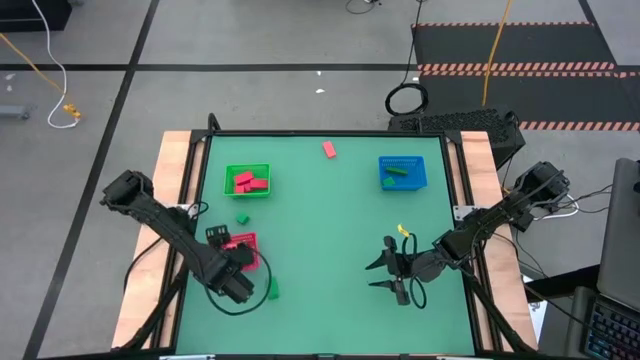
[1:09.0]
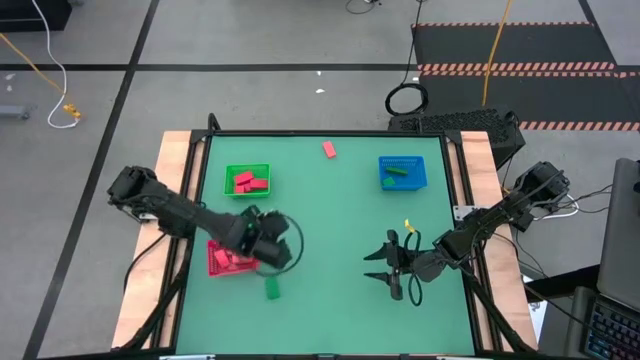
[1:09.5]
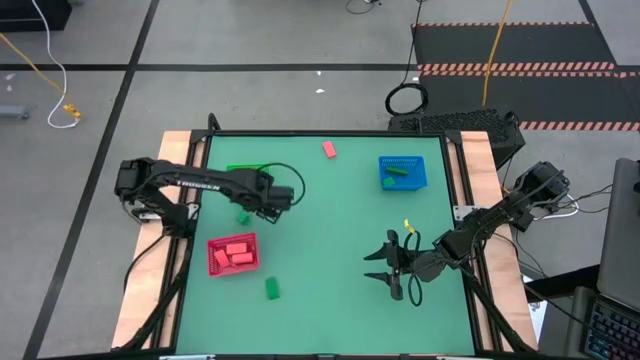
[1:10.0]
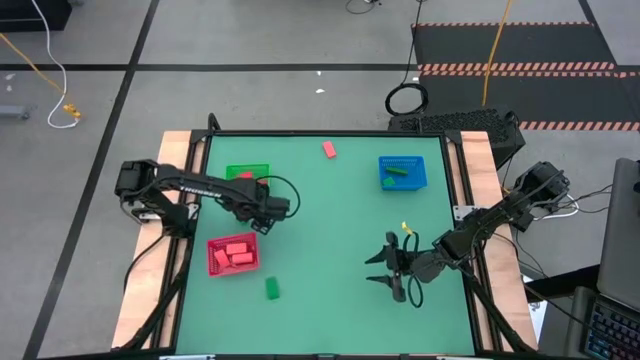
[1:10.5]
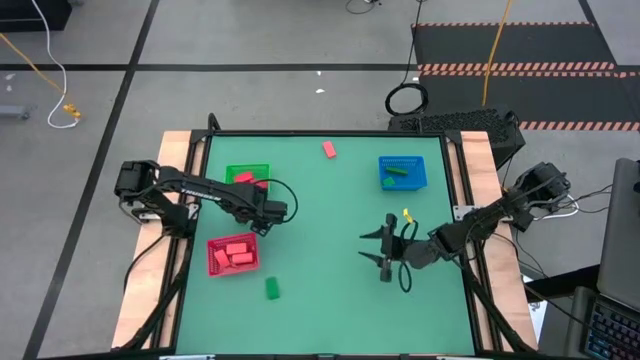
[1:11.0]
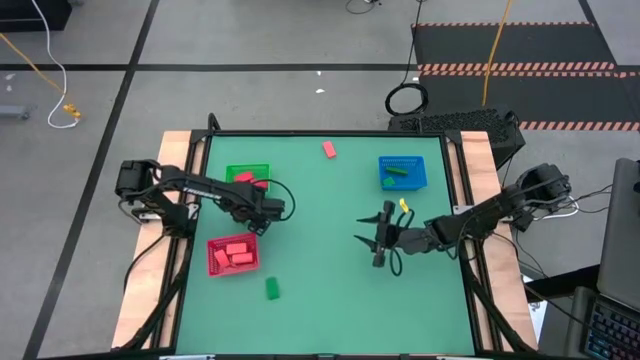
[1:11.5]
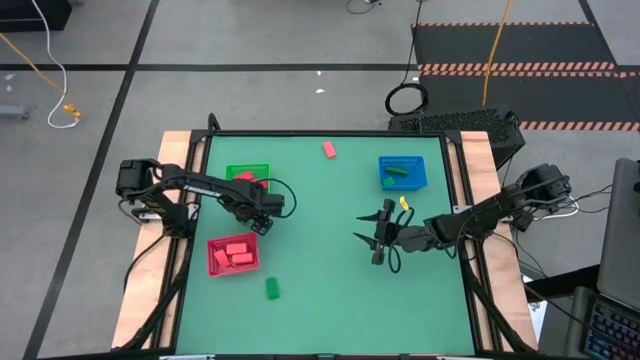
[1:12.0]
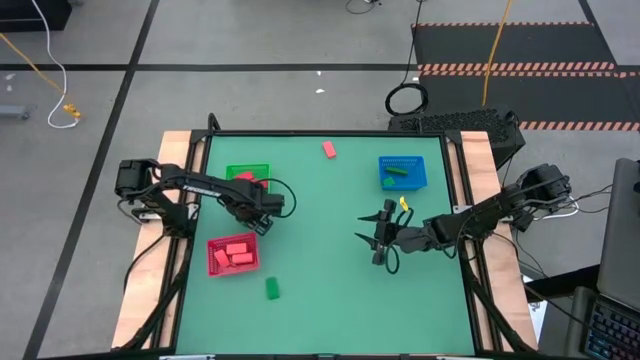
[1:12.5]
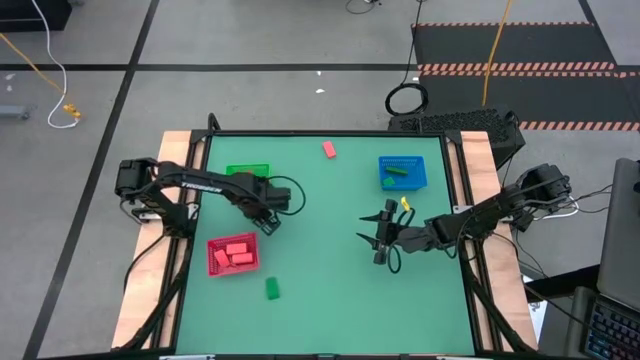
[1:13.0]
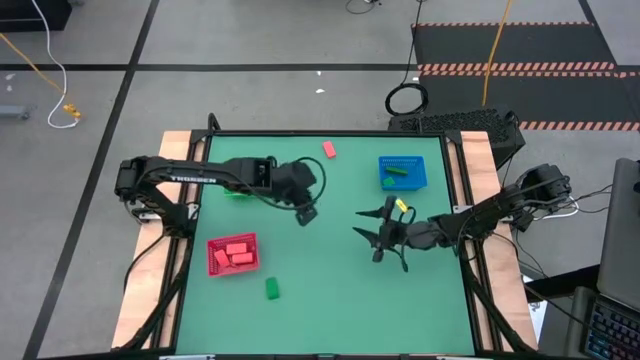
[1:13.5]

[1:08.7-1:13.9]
Task: Sort & place blocks by color
Put the green block into the blue bin

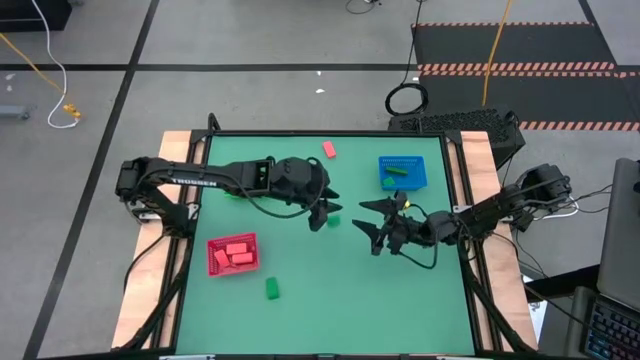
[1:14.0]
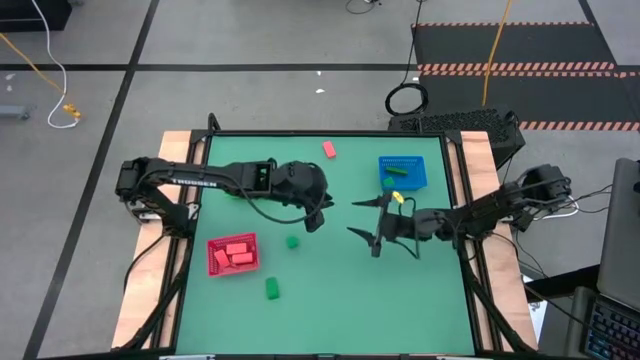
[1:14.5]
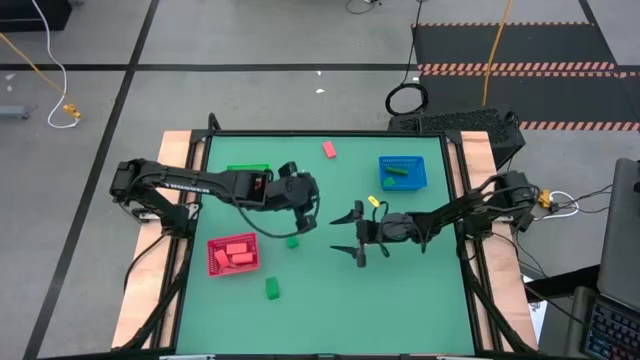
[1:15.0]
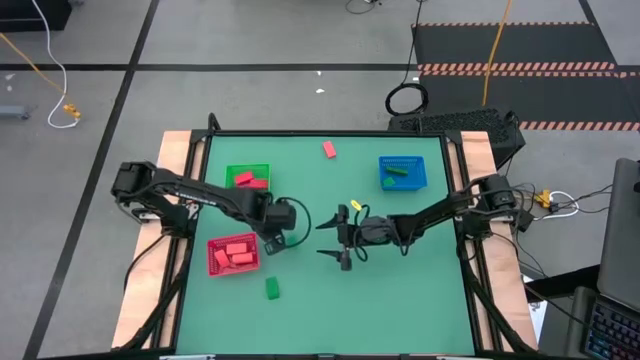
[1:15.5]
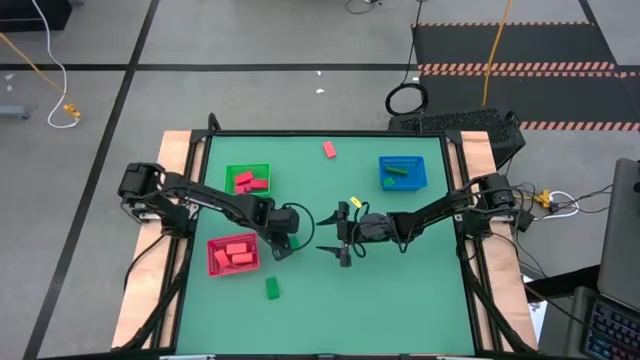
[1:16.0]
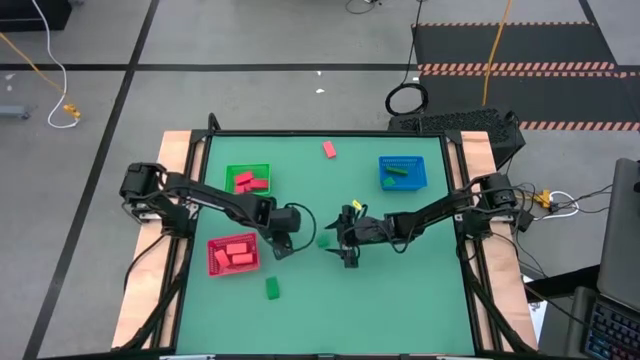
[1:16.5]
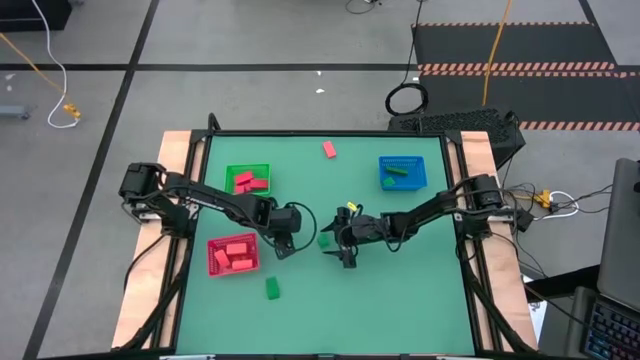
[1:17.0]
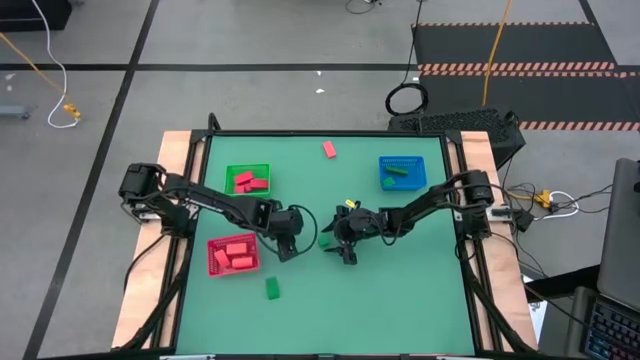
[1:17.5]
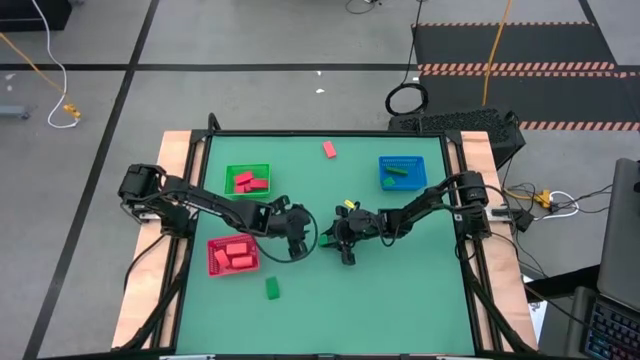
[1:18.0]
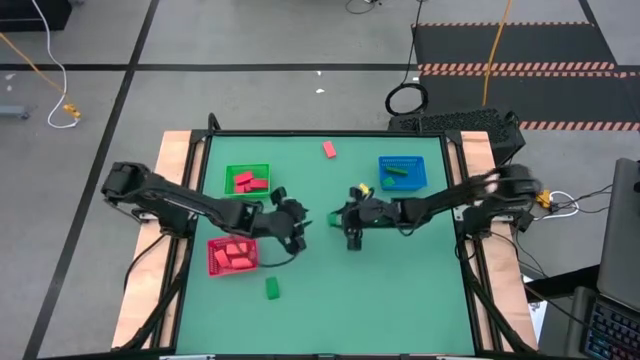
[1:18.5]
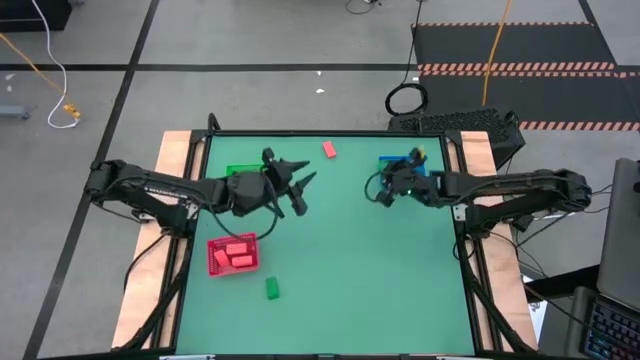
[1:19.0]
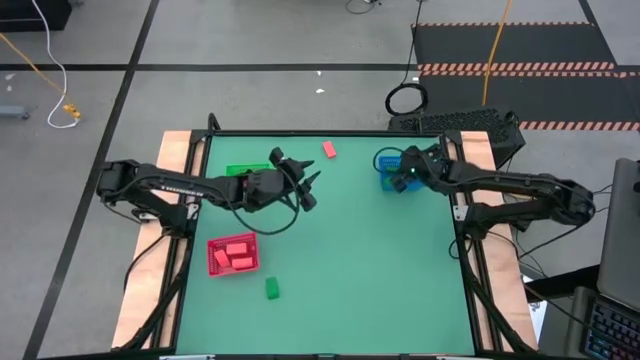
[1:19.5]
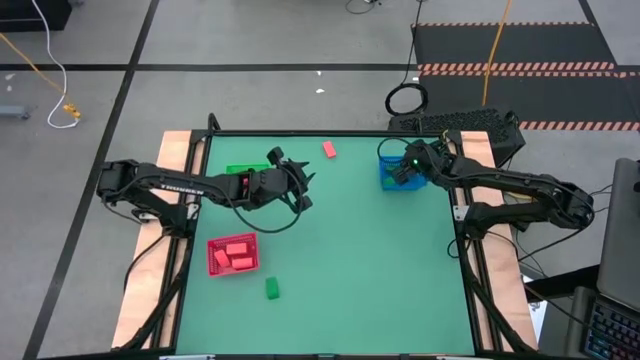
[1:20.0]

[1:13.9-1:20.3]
Put the green block into the blue bin

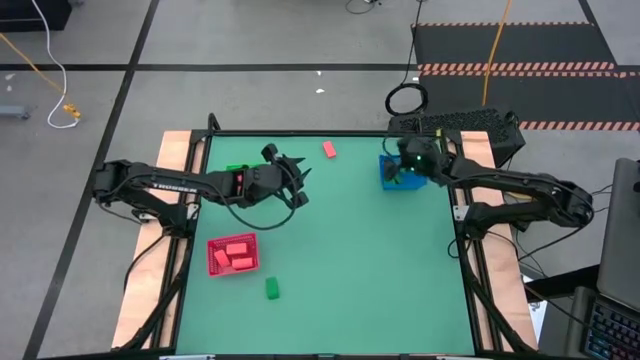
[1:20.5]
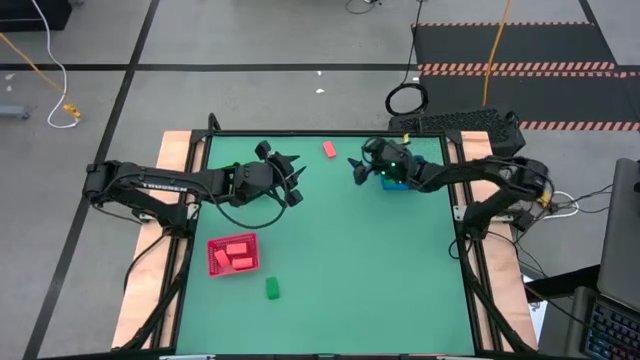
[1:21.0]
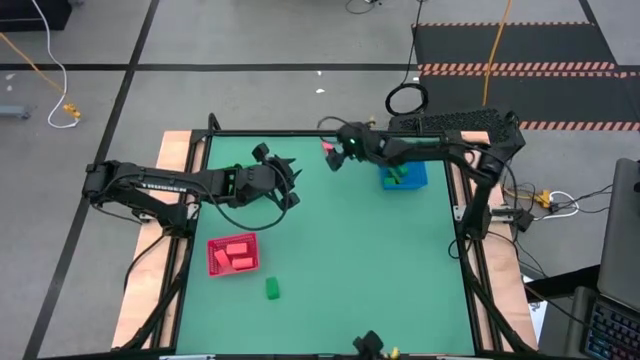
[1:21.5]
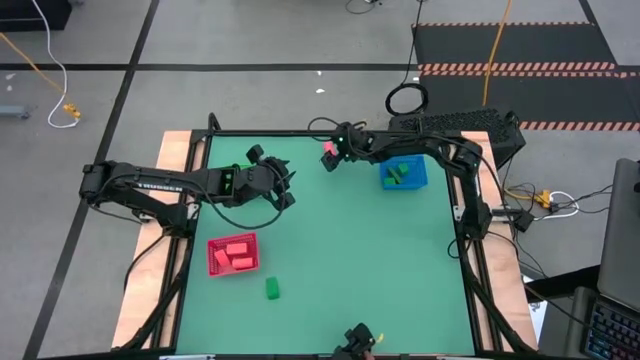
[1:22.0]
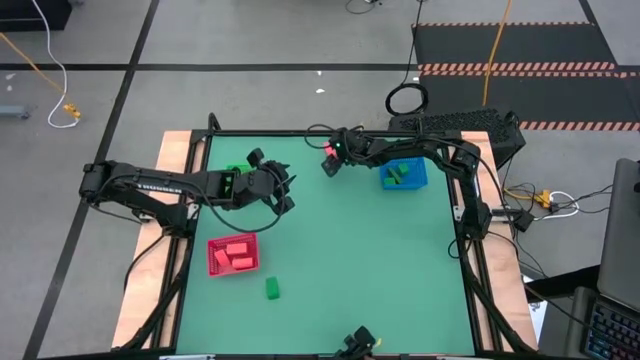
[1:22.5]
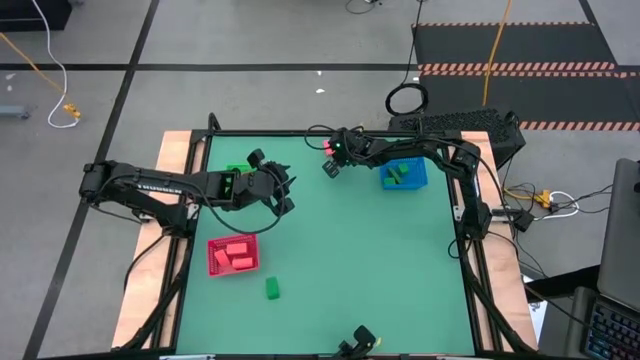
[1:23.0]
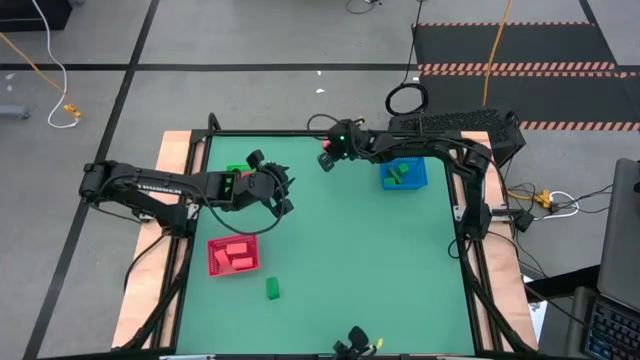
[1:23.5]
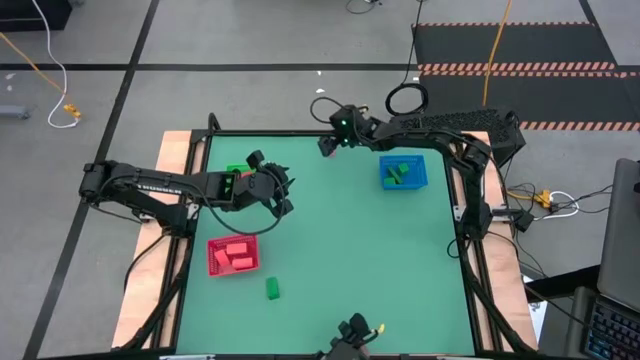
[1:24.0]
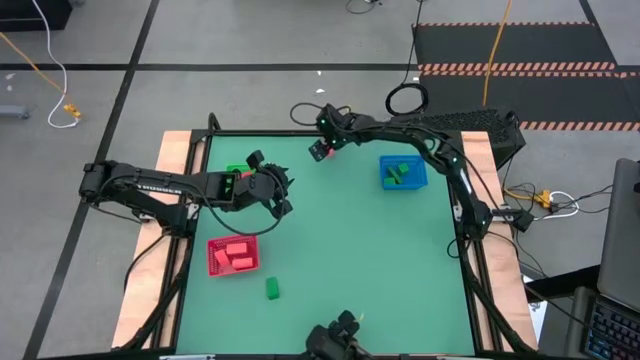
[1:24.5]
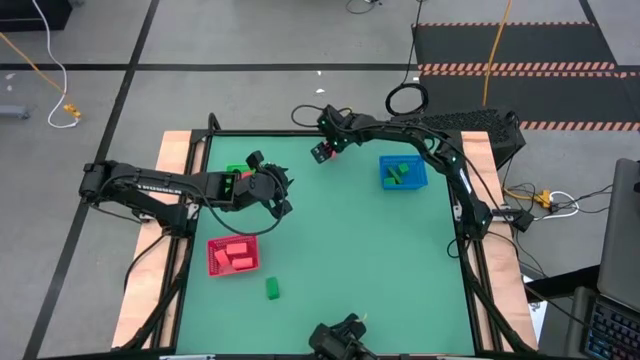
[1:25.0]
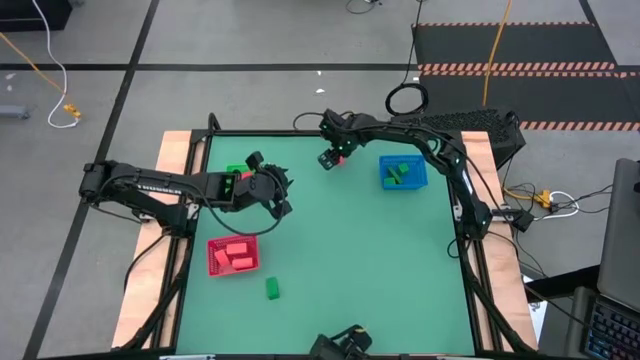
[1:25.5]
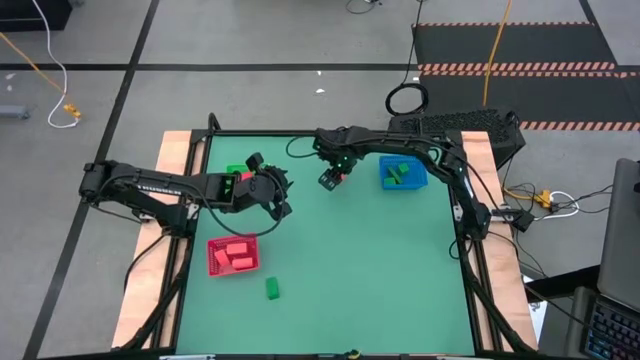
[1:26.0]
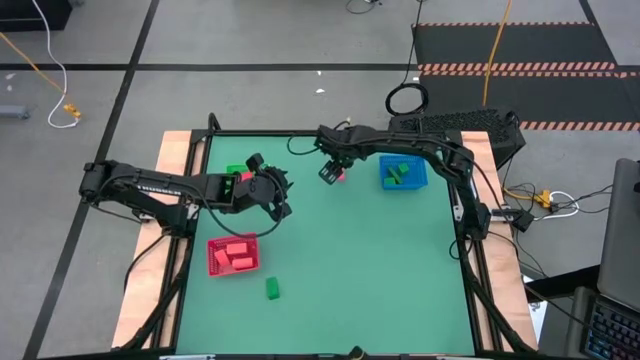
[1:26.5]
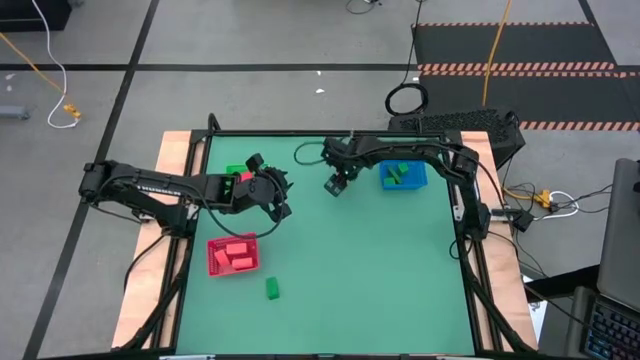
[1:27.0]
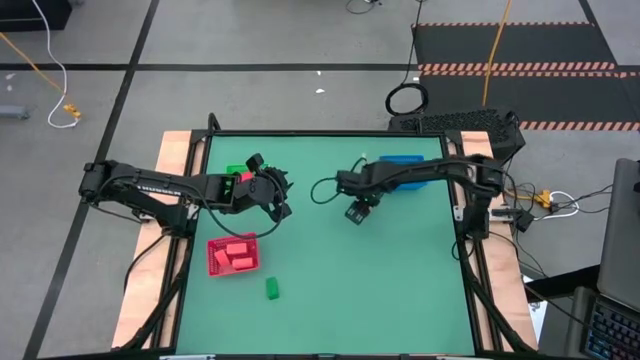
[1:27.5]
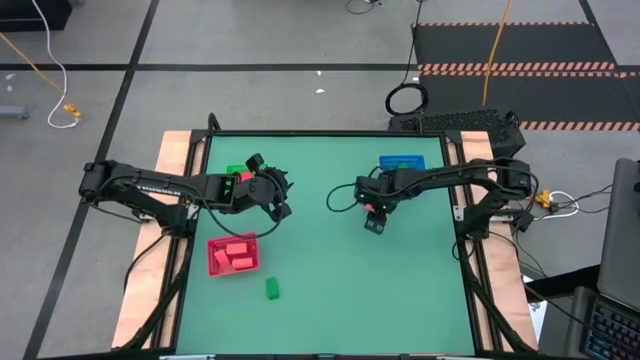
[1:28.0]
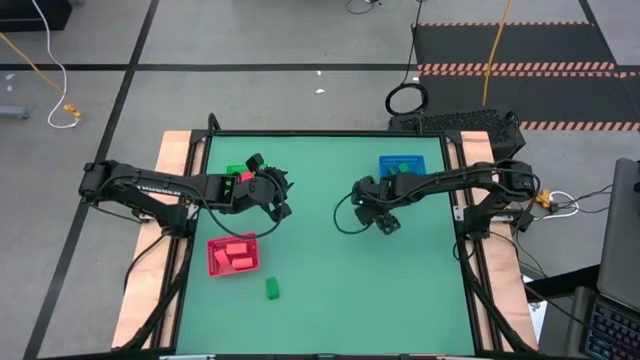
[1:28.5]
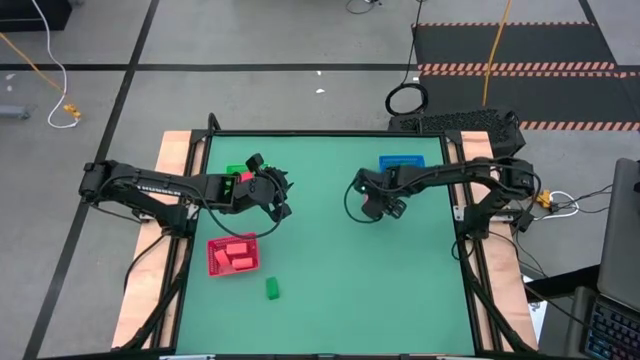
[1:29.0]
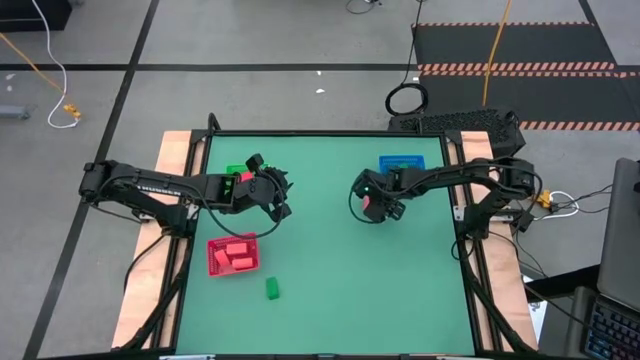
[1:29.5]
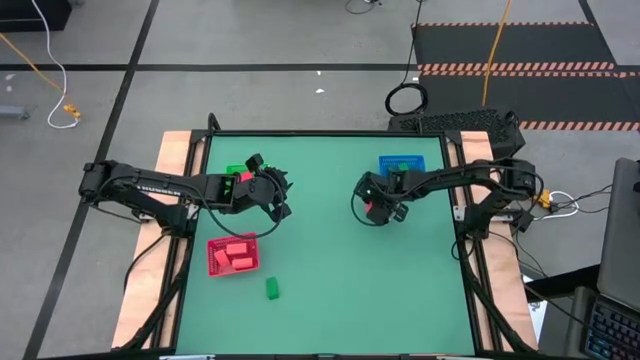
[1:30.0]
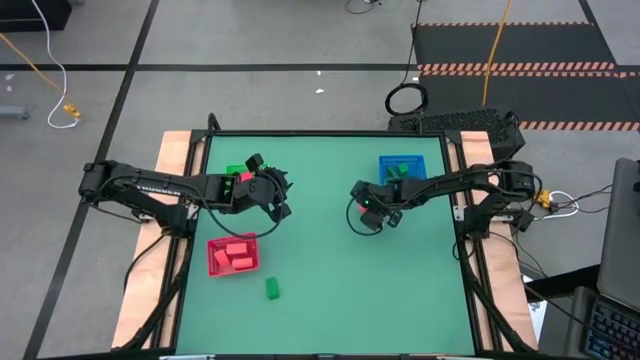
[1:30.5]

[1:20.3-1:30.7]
Put the orange block into the red bin
